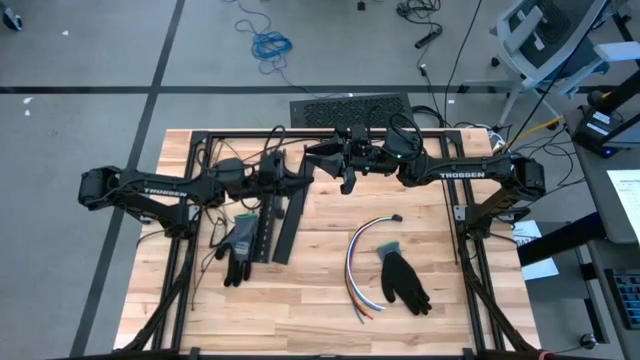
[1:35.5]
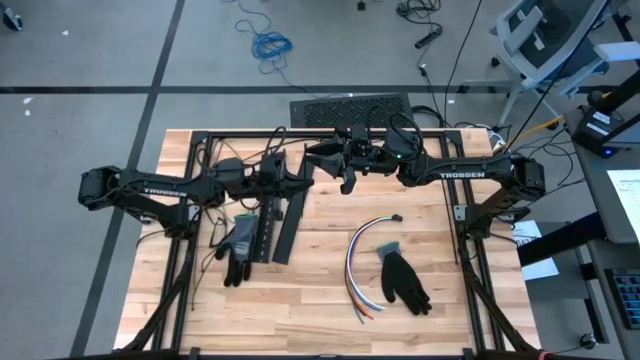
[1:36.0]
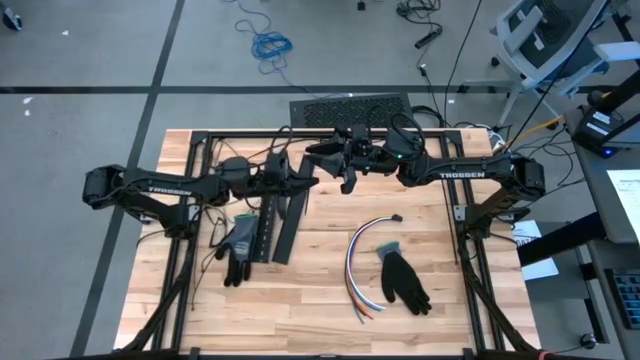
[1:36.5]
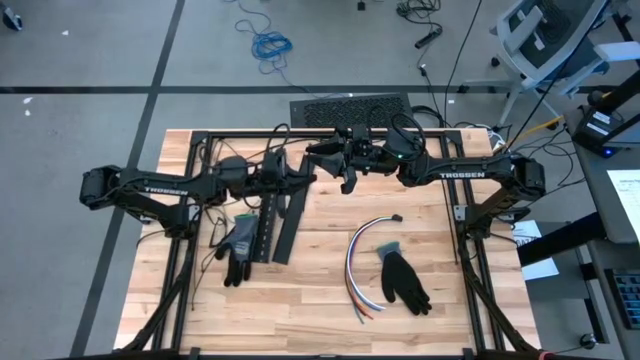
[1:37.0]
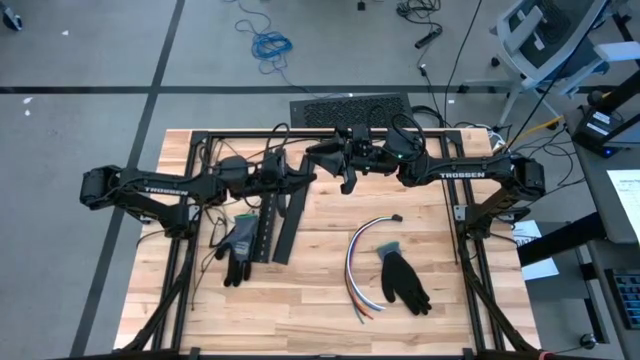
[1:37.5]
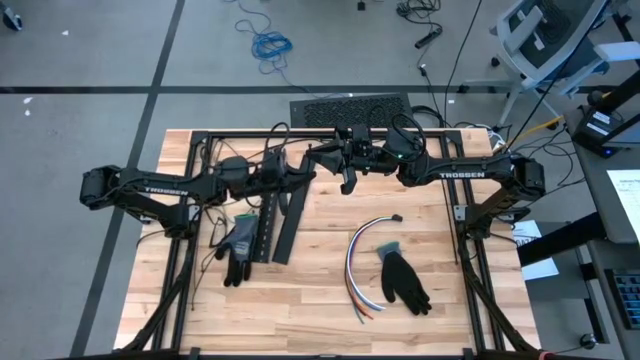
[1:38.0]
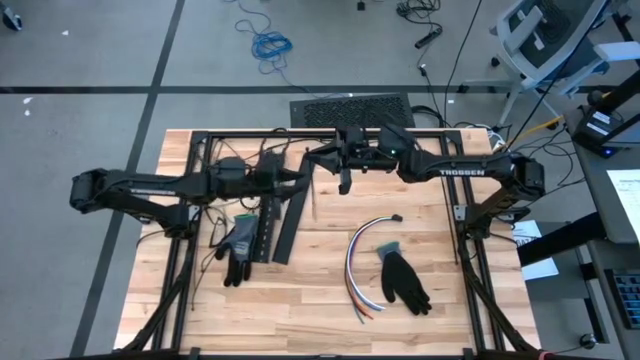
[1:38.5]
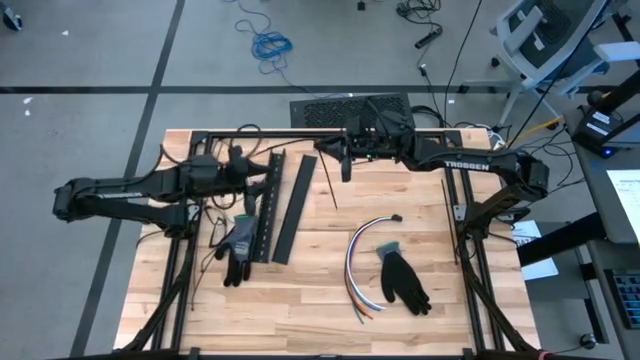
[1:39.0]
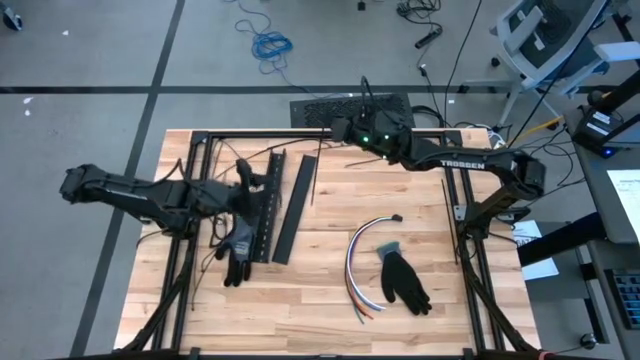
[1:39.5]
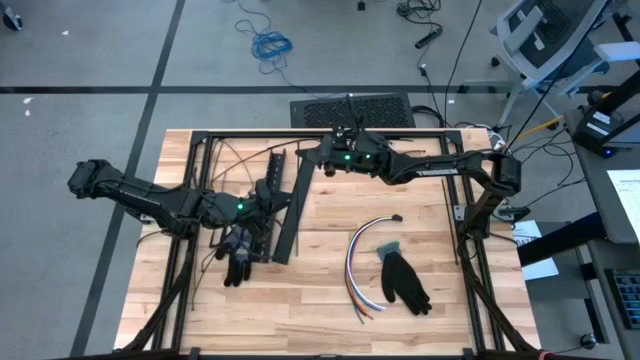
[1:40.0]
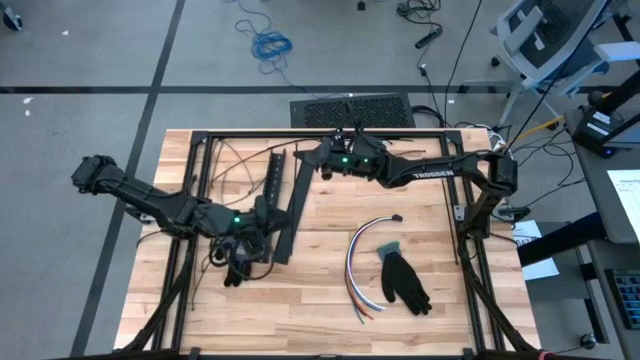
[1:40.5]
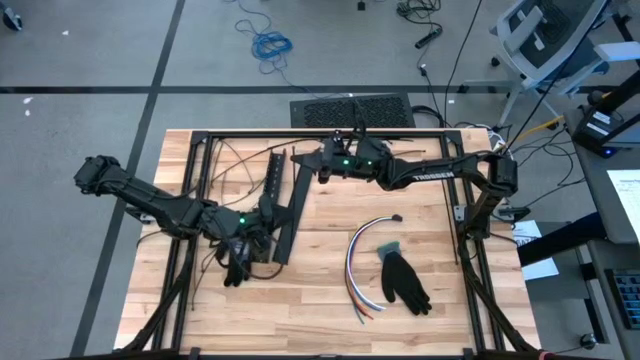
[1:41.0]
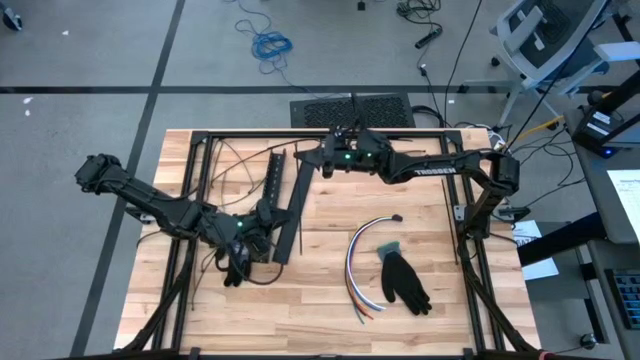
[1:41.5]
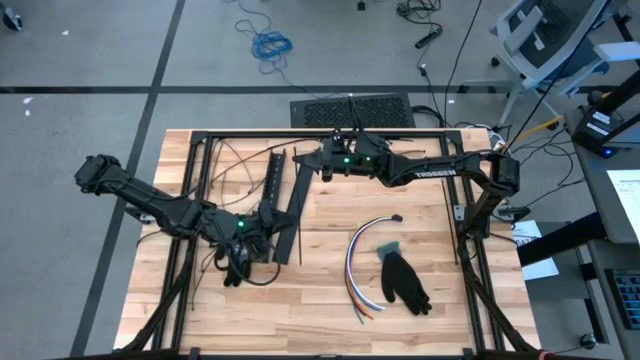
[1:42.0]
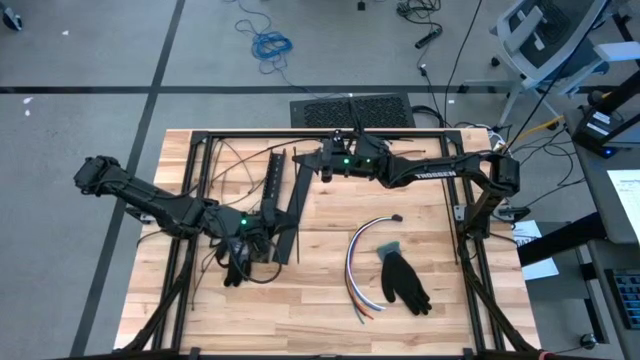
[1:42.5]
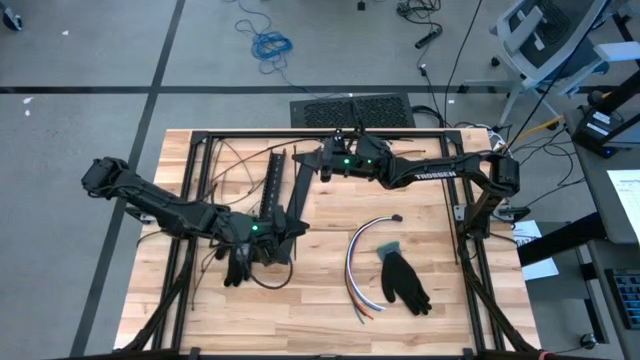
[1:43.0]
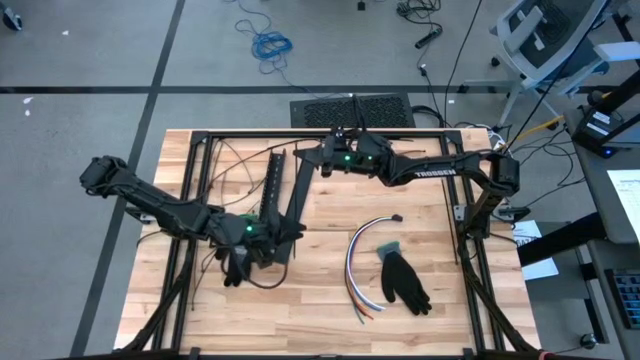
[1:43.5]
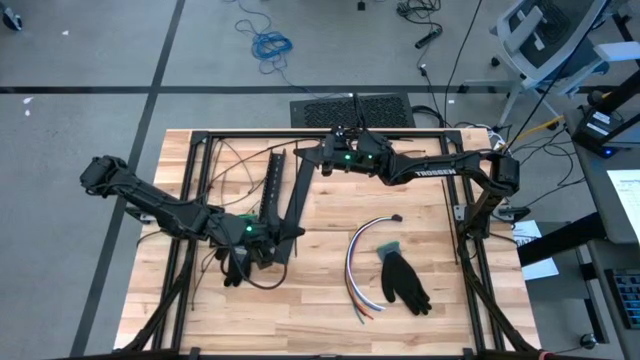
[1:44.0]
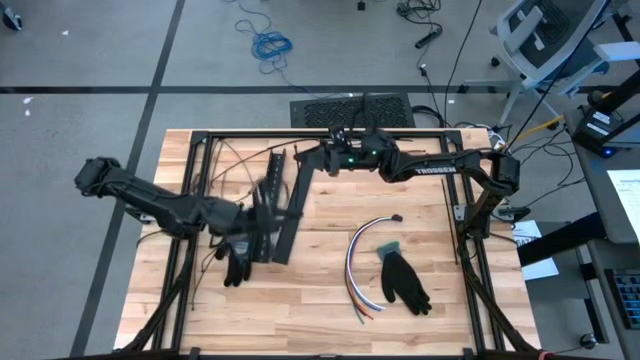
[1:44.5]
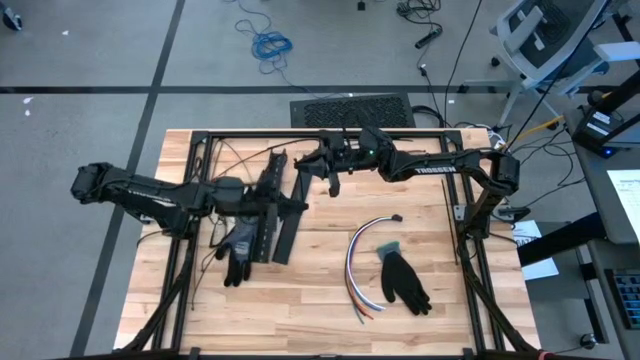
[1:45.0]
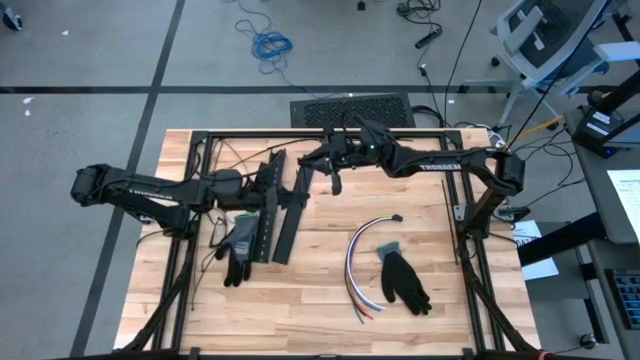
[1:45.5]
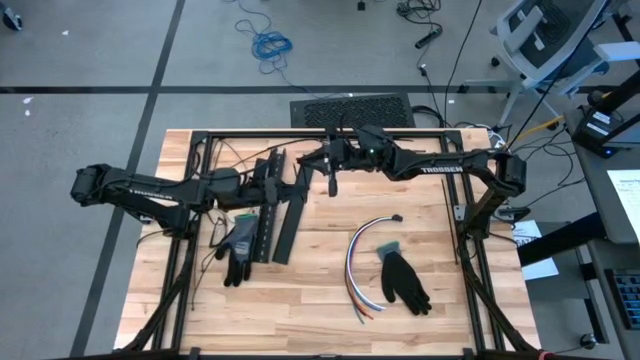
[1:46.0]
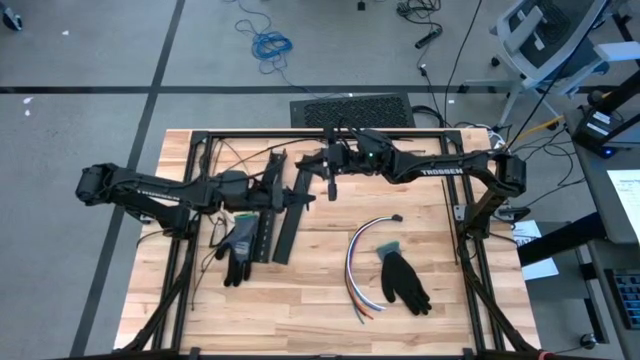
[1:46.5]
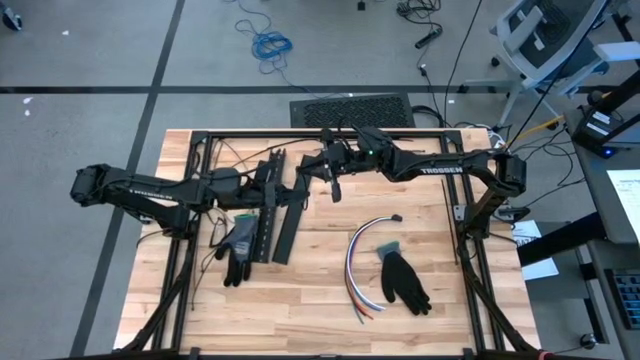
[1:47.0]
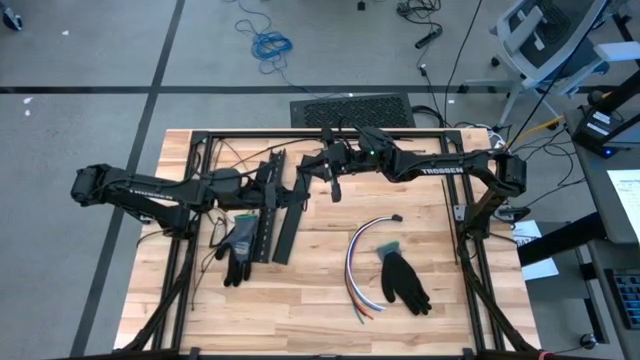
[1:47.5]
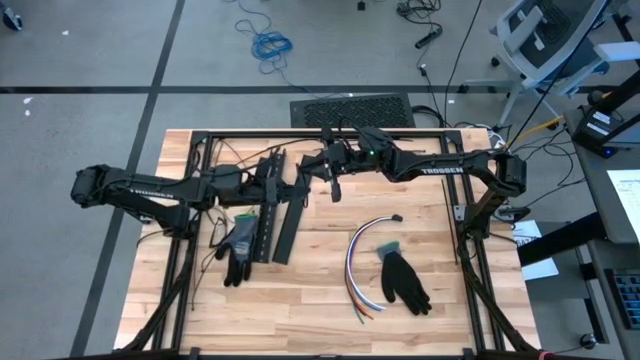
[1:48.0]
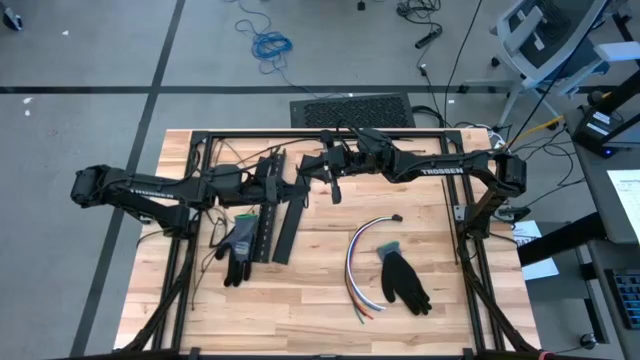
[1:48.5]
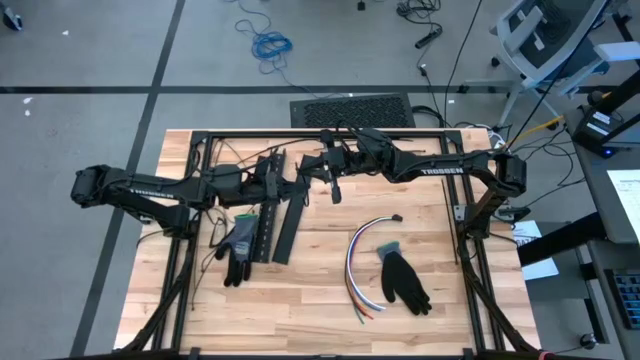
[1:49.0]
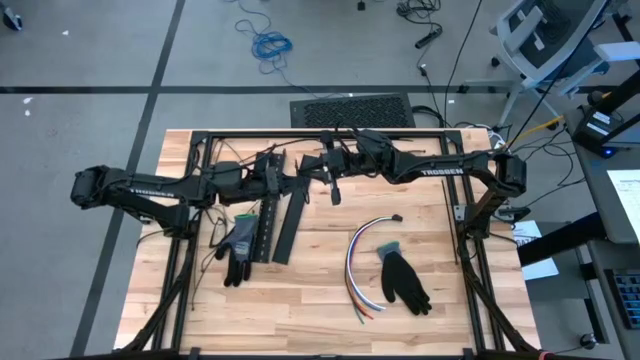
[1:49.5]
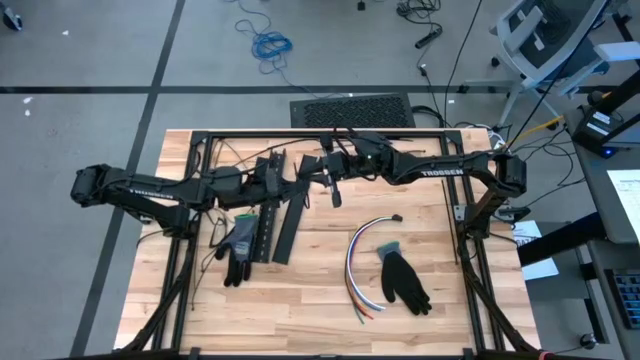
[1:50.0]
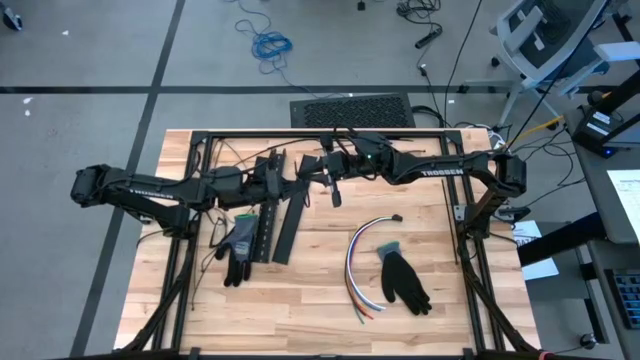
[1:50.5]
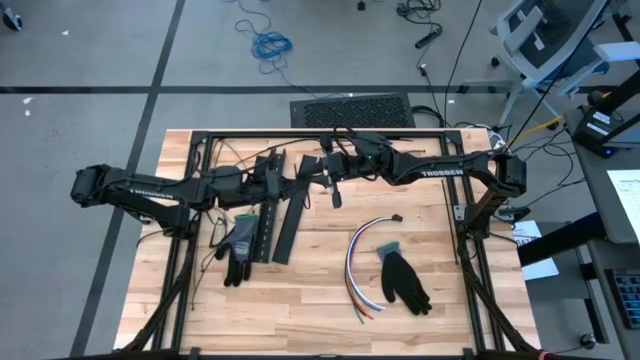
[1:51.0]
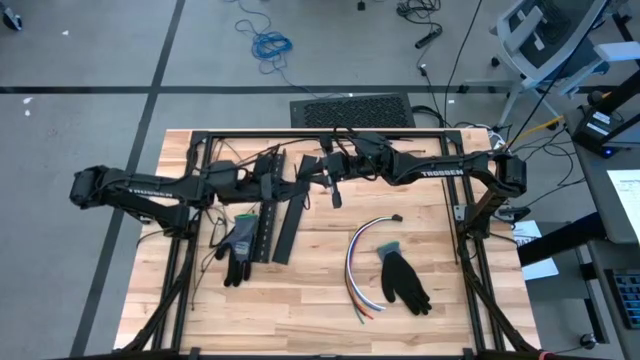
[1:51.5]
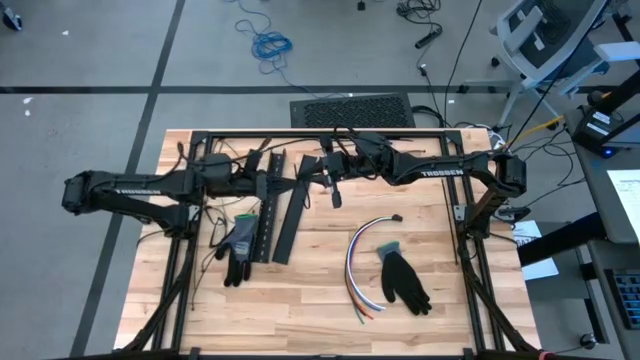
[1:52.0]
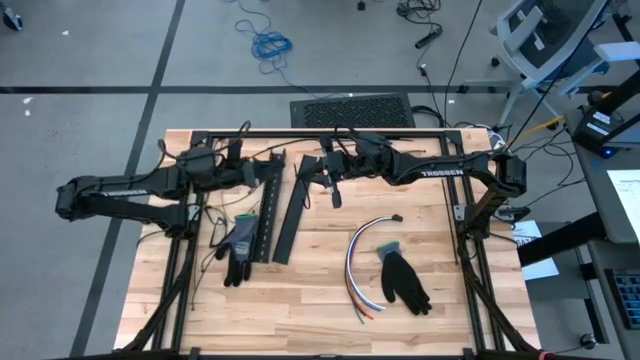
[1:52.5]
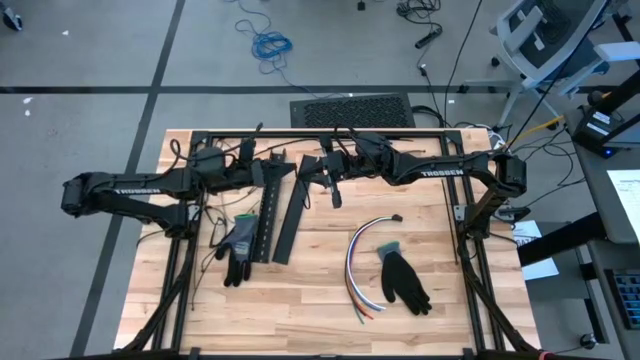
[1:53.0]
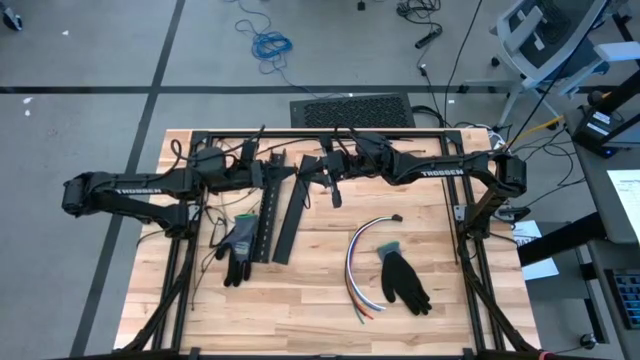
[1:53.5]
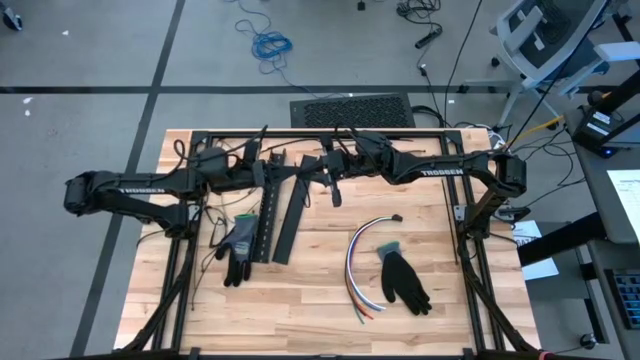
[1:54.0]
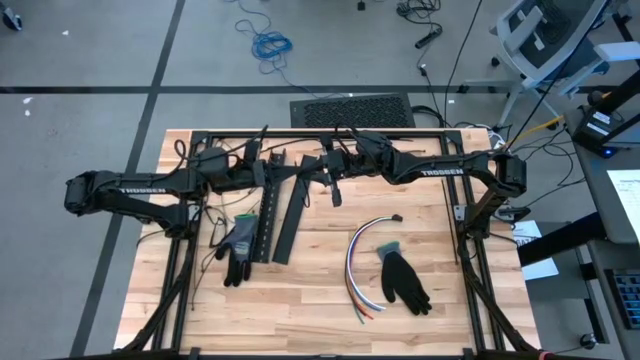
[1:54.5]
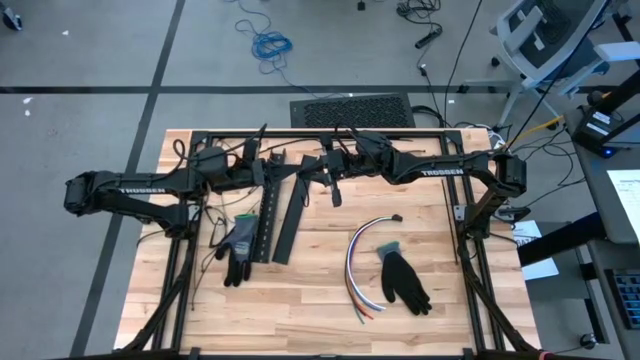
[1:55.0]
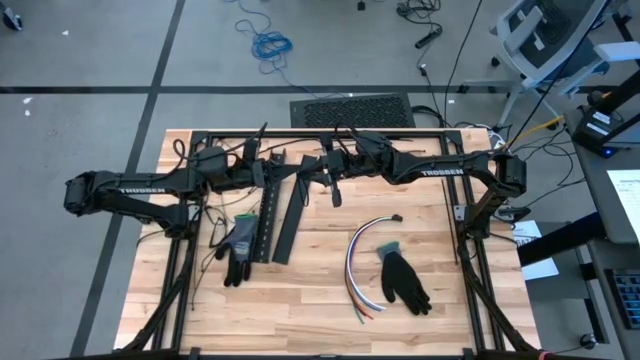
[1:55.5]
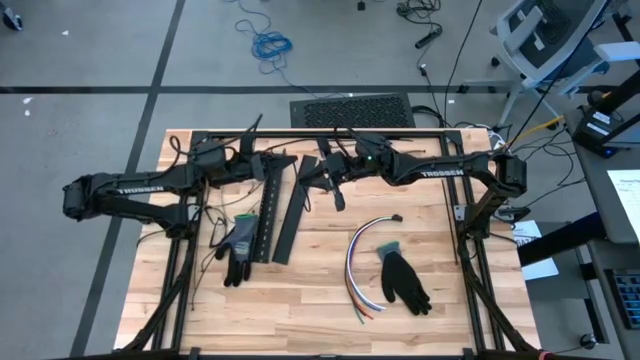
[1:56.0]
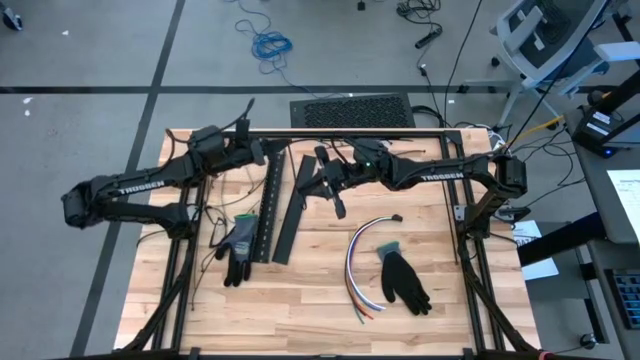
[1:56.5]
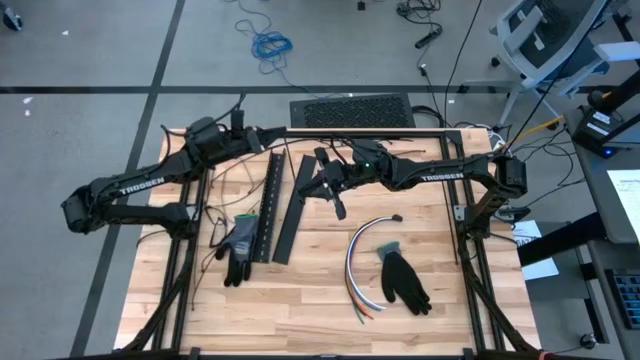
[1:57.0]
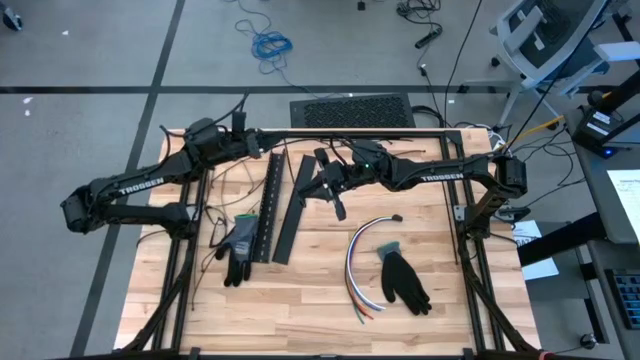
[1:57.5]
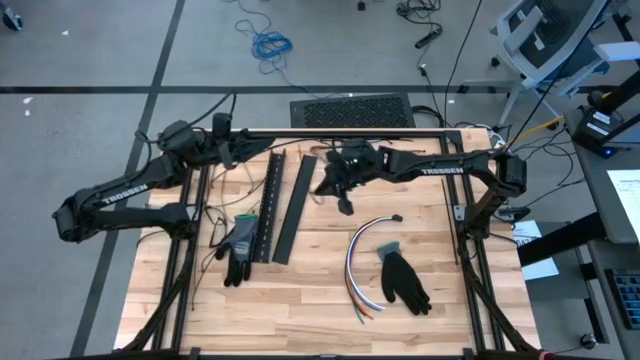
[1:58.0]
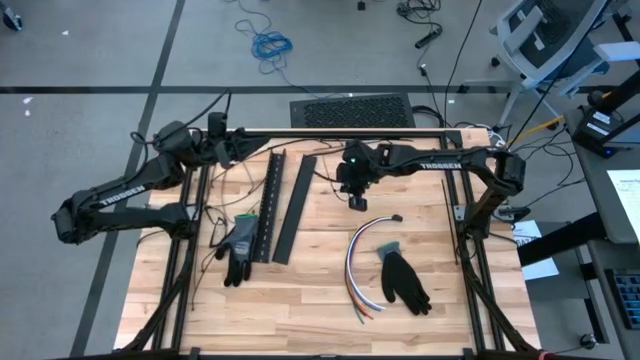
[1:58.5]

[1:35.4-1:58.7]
Task: Ziptie cables
Wrap the cable wires with the black ziptie
